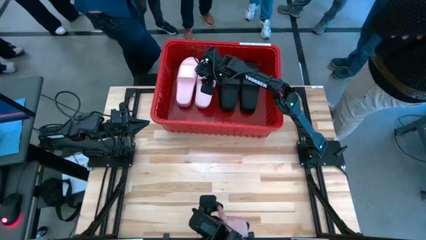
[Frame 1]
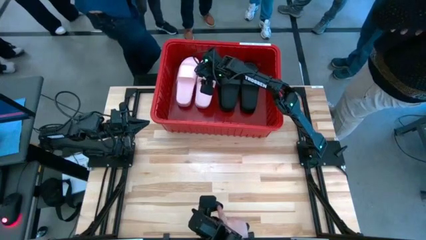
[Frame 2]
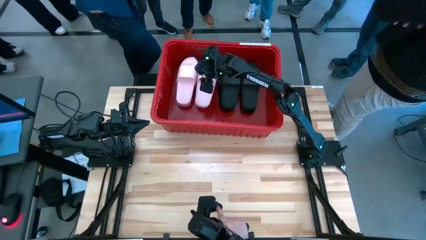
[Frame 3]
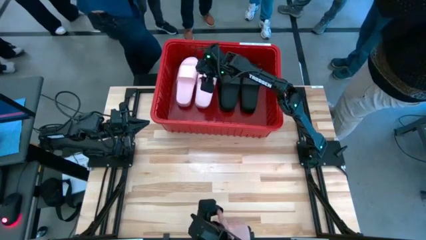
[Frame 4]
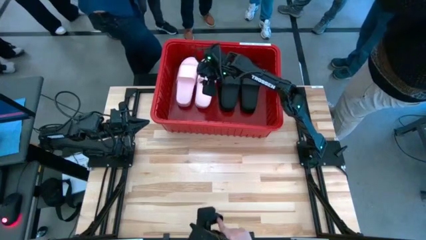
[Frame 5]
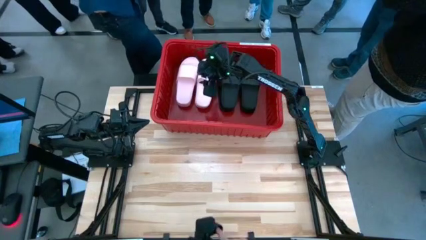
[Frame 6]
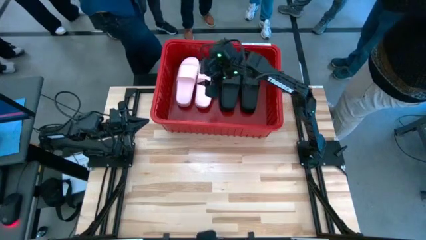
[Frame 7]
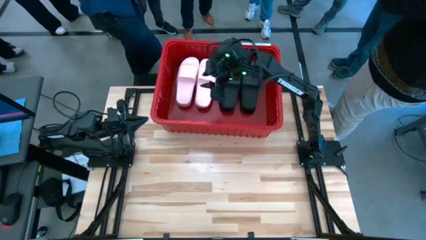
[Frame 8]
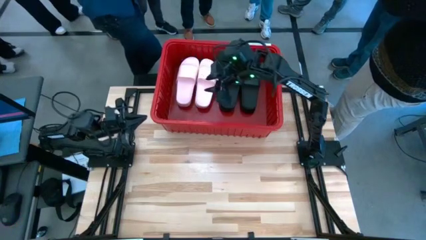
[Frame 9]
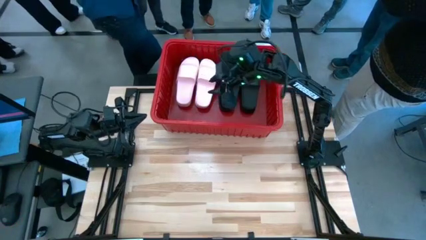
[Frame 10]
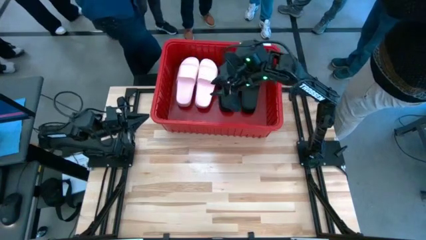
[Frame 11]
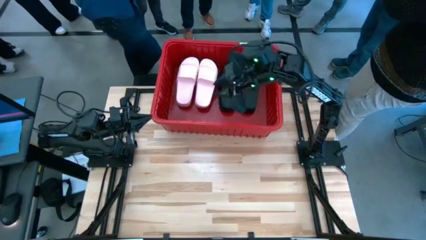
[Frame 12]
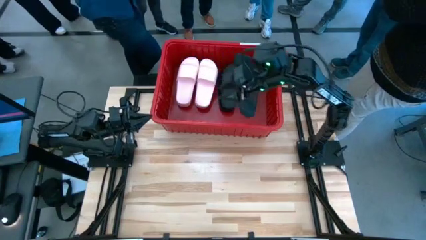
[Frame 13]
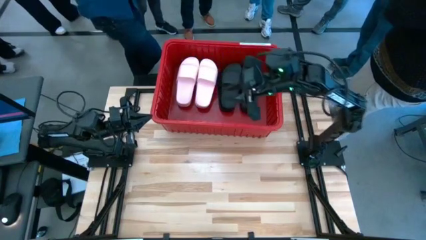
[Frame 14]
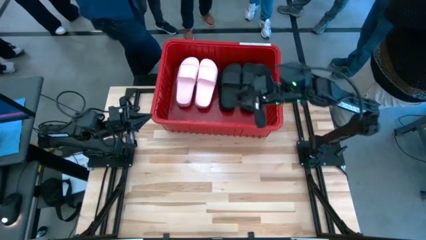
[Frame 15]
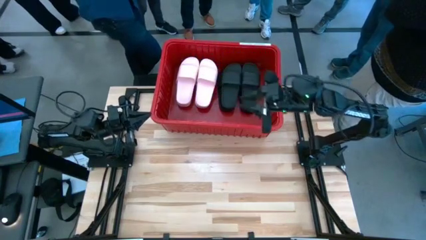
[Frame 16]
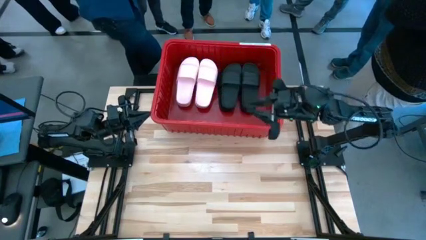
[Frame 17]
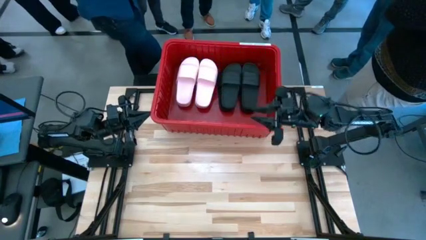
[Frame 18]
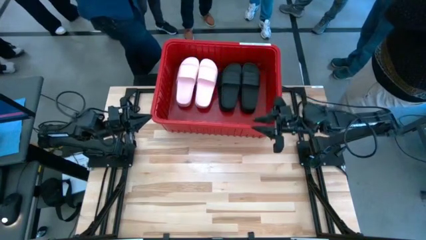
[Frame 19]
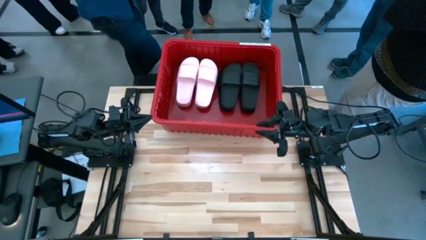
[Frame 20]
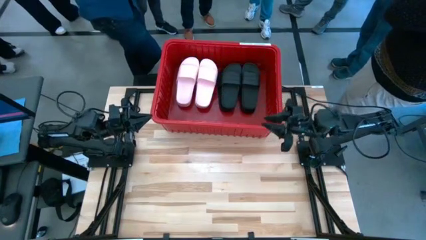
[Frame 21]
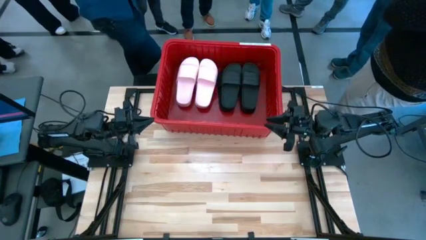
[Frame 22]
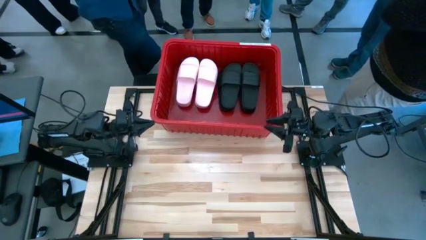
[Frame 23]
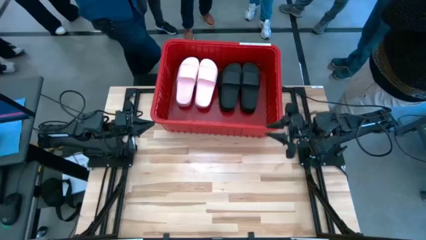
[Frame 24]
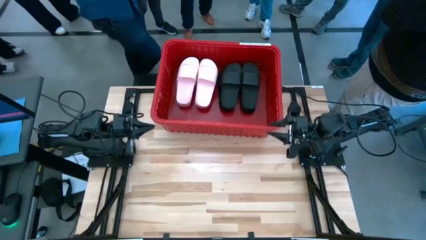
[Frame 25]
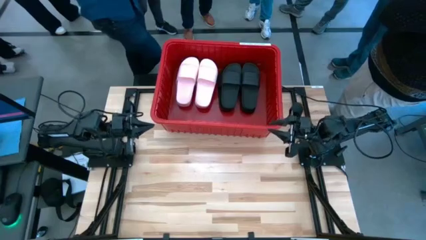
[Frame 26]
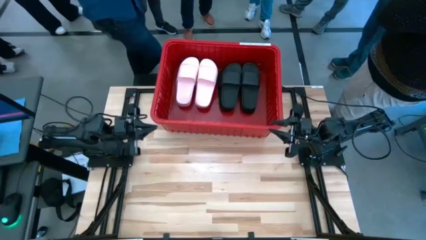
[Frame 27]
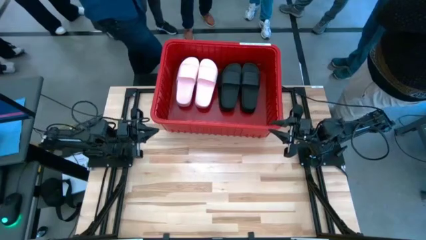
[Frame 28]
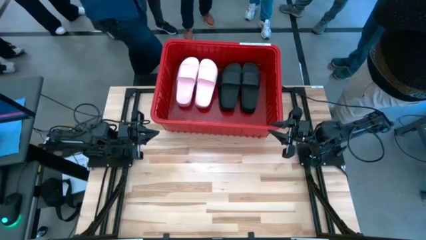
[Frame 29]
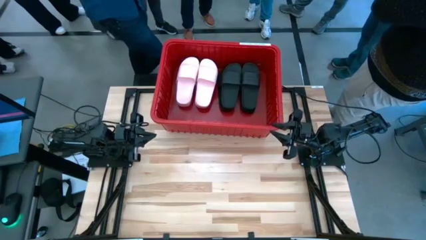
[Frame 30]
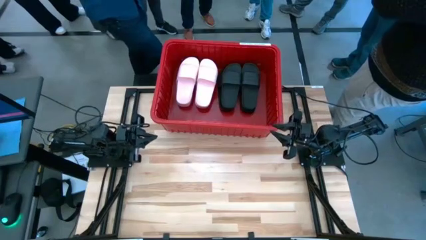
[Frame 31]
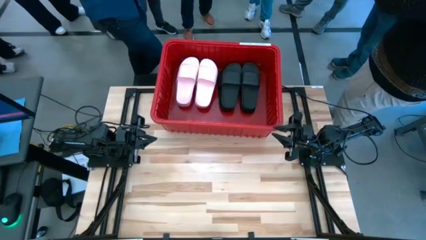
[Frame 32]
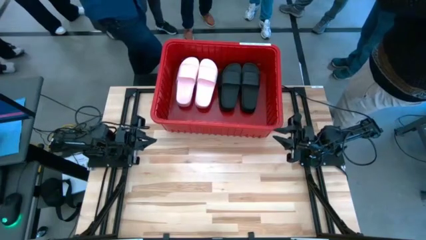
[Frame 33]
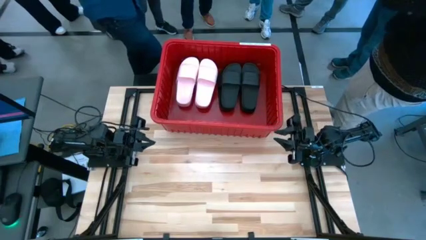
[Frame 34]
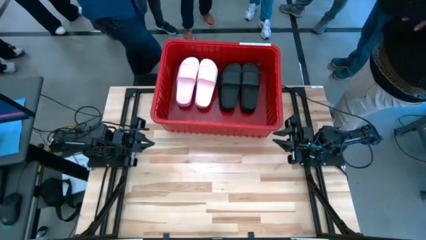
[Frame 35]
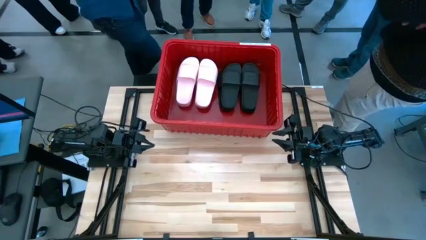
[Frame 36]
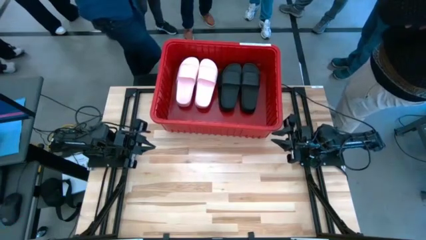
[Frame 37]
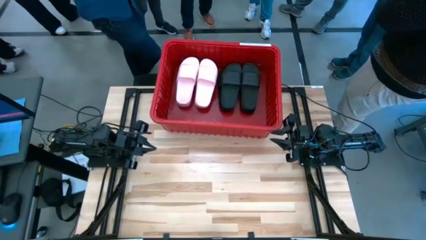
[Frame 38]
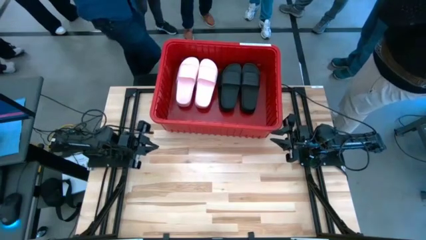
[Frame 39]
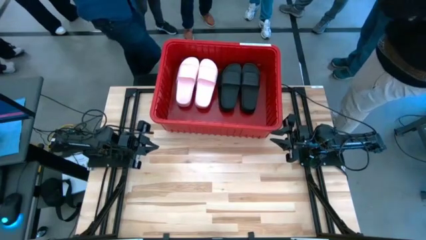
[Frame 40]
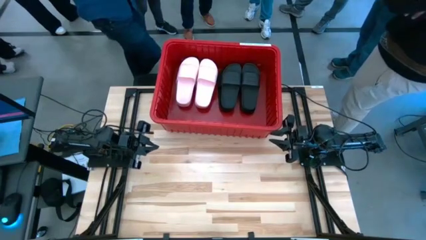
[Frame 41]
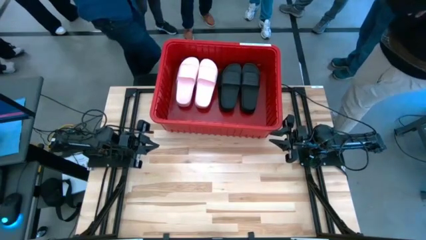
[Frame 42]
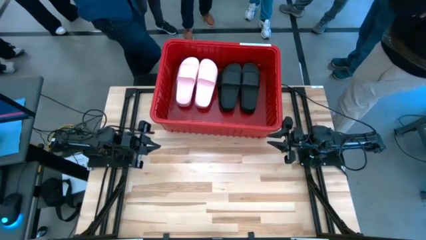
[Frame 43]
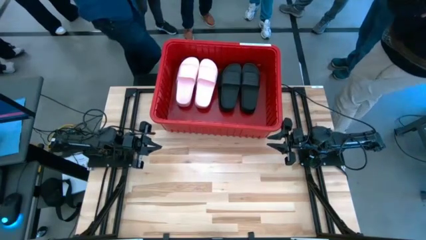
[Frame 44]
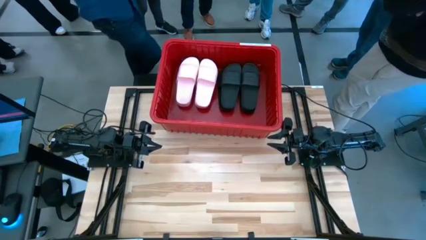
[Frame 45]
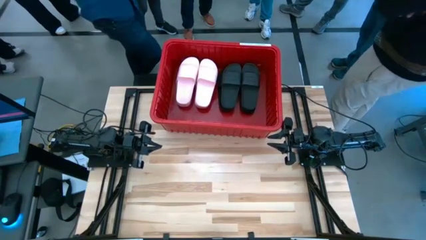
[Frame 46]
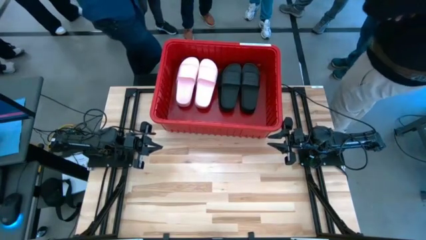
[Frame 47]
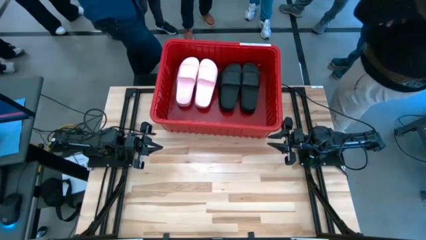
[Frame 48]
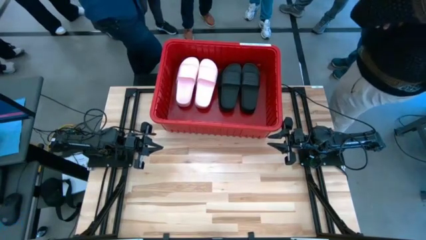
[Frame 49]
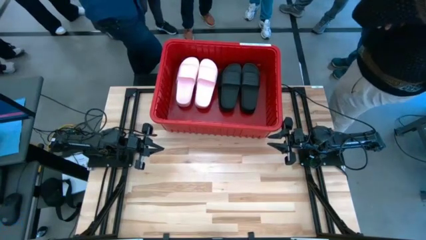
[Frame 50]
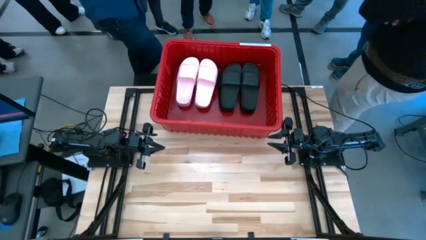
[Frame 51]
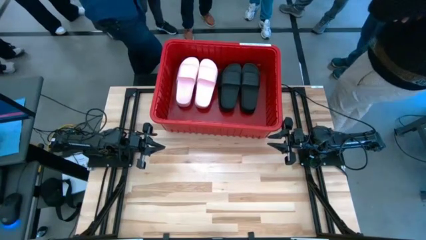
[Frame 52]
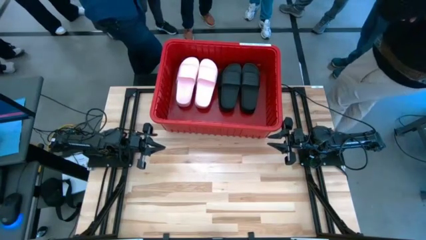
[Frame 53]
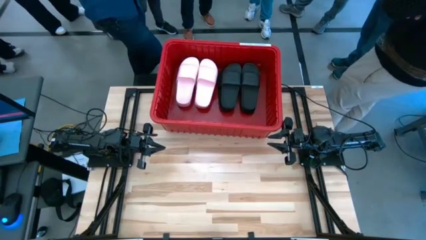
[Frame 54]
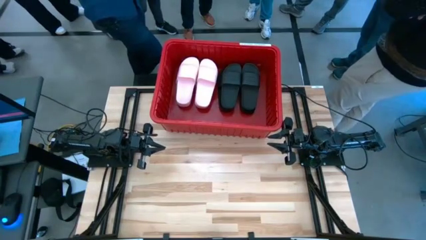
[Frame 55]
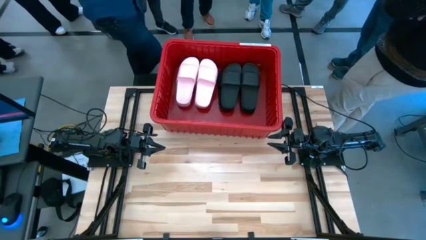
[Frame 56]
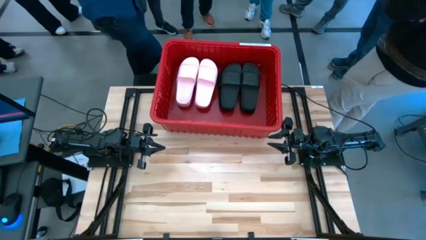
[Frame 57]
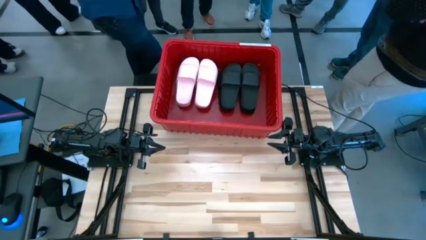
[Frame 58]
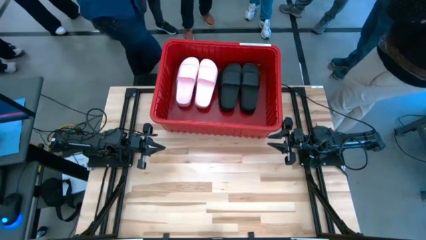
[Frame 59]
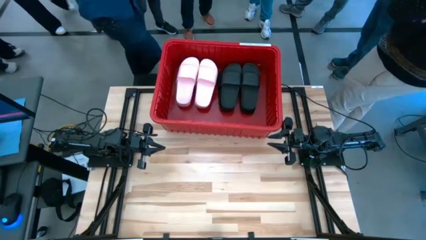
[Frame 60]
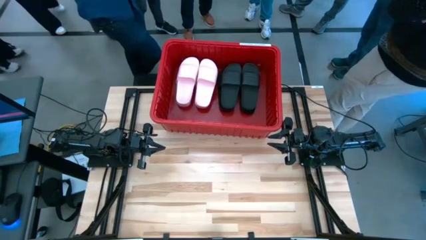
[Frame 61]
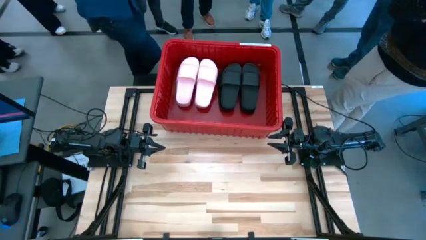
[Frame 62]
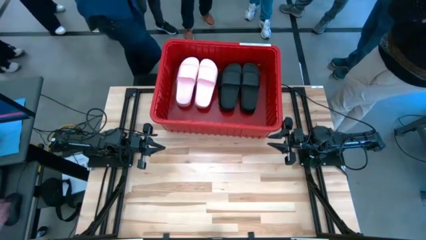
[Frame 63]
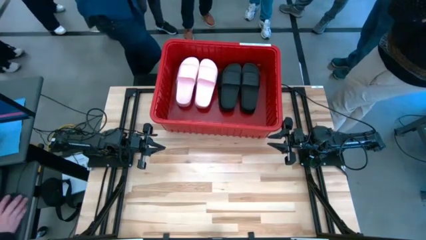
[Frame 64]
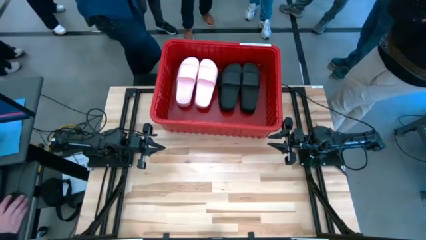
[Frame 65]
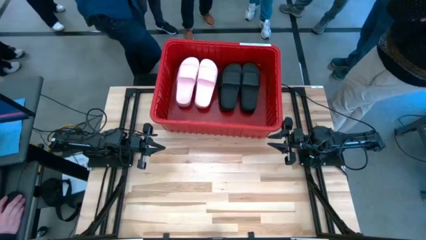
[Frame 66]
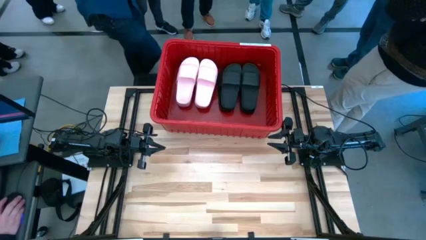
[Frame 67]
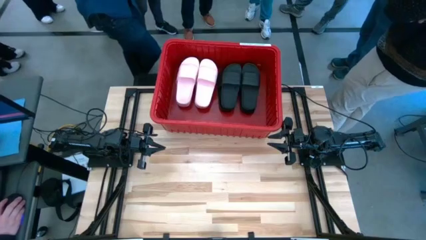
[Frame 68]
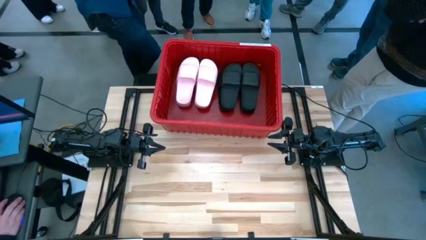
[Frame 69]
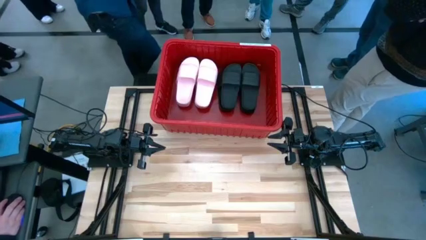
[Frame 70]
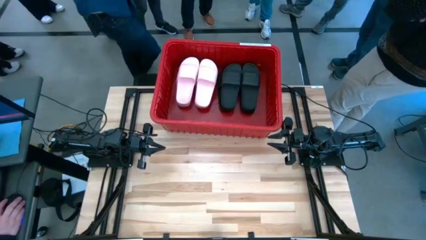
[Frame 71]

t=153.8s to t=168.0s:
Task: Pick and place slides into bin
Return to Home Position

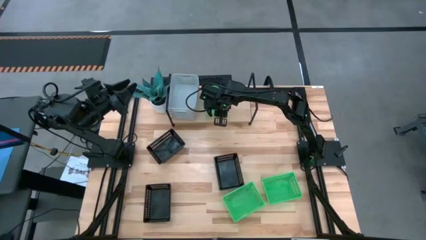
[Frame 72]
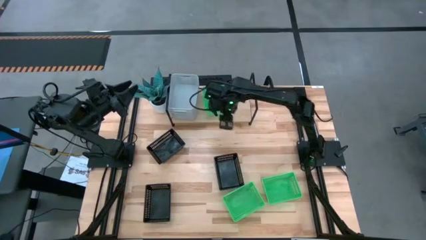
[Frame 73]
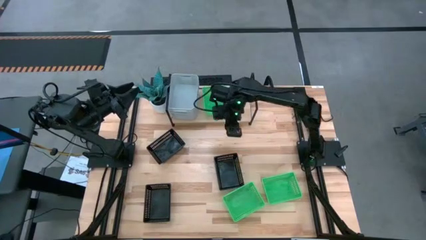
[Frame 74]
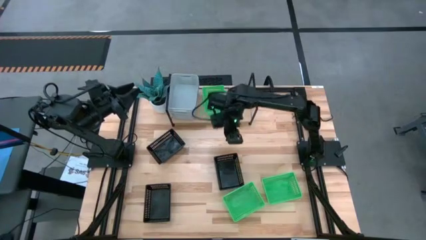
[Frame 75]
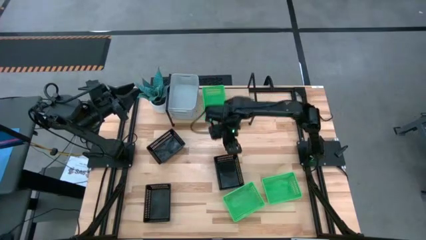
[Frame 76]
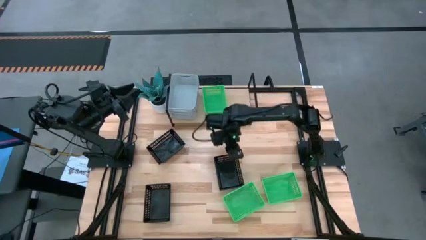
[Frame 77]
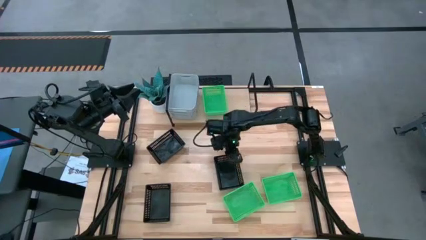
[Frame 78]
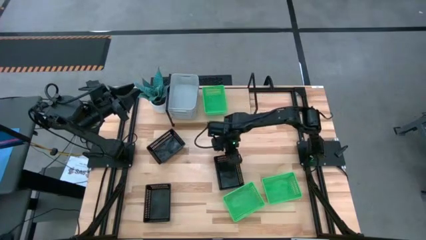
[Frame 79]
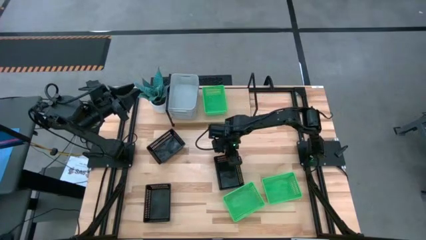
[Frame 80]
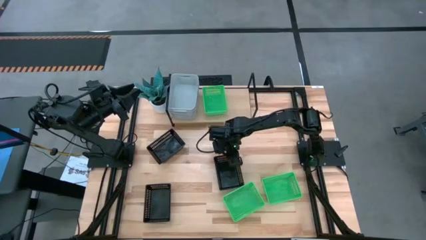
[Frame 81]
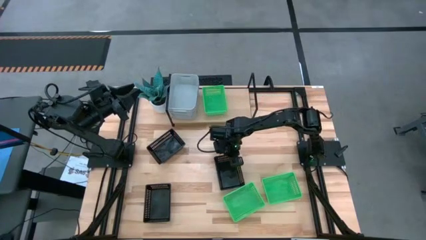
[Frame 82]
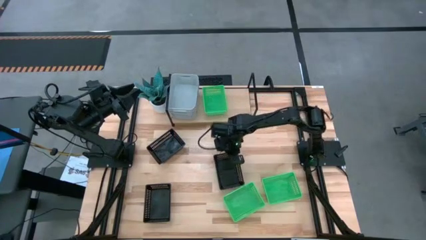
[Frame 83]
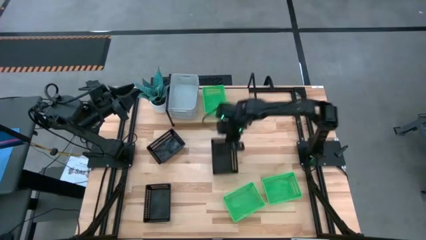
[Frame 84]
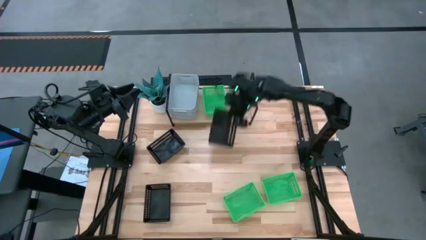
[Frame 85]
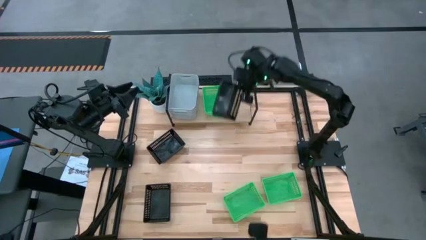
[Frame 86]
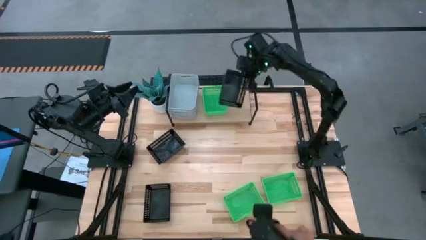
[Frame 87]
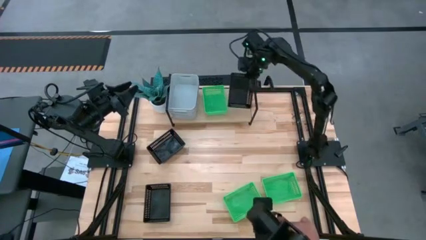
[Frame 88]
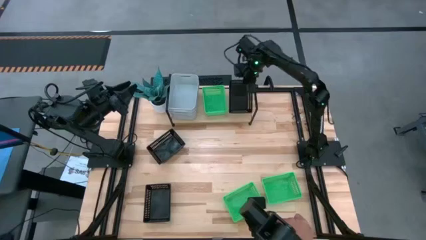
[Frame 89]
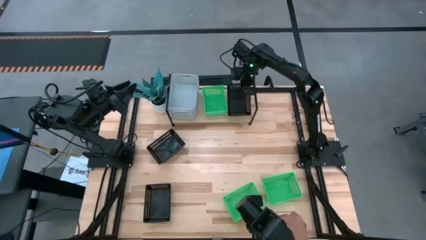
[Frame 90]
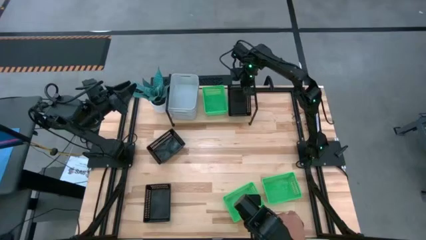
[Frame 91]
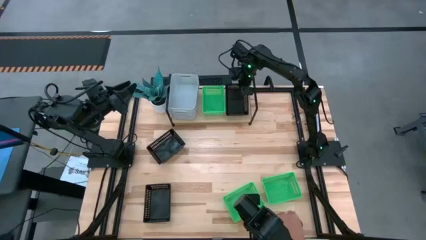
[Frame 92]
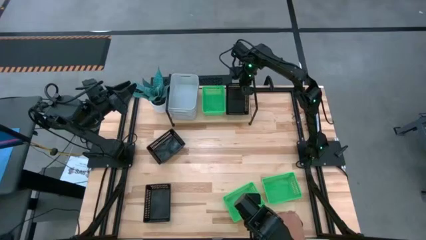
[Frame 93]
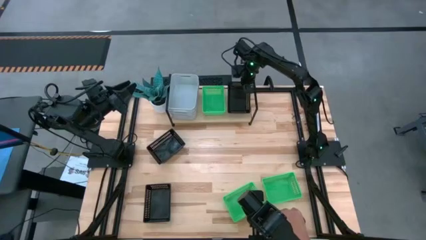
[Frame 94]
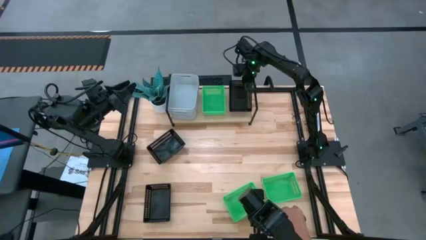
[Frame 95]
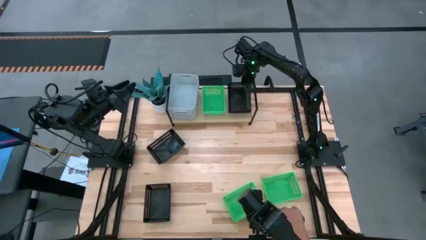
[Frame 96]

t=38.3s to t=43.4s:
Task: Stack baskets on shelf by color
Put the middle black bin on the shelf
